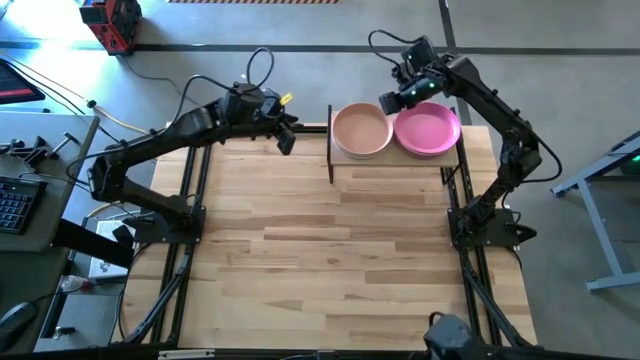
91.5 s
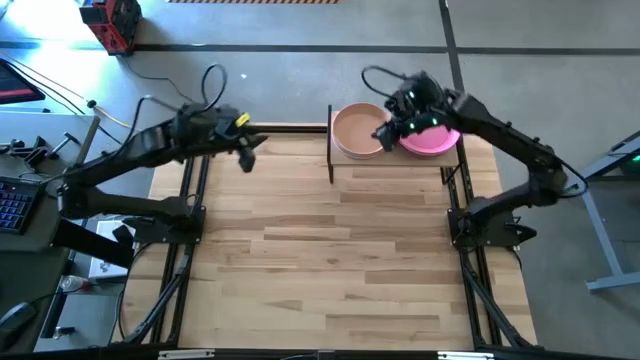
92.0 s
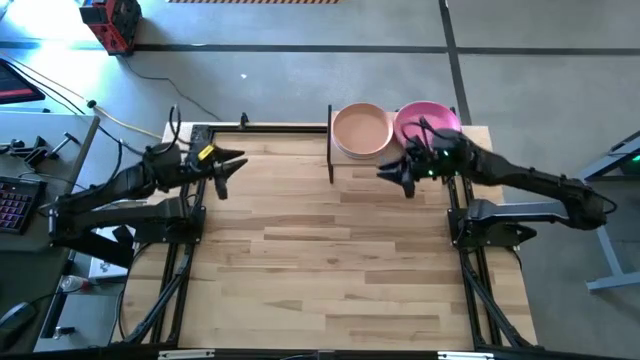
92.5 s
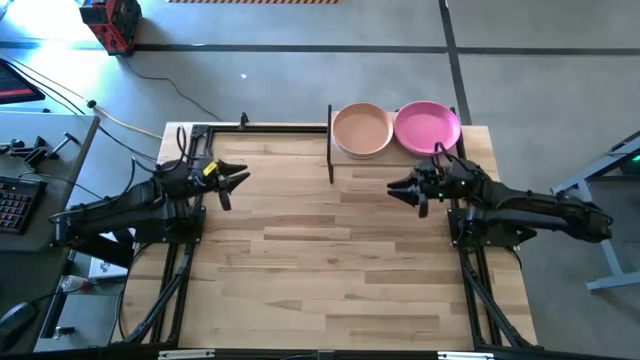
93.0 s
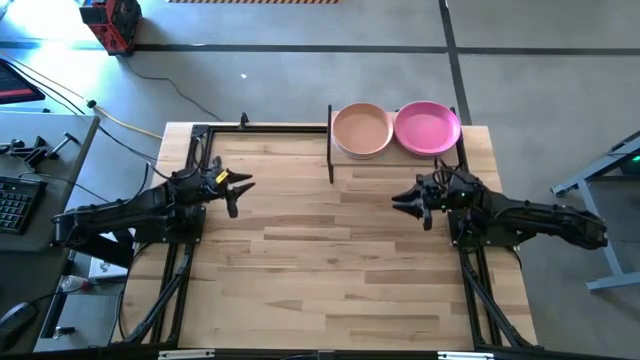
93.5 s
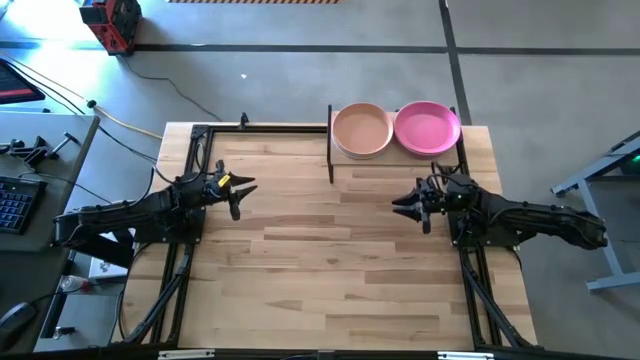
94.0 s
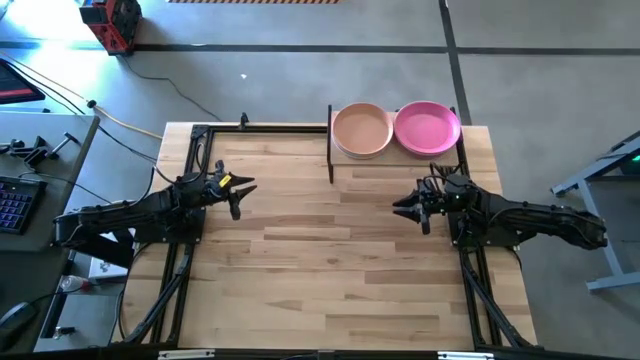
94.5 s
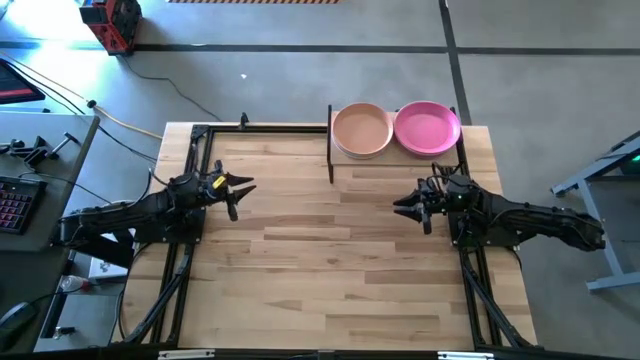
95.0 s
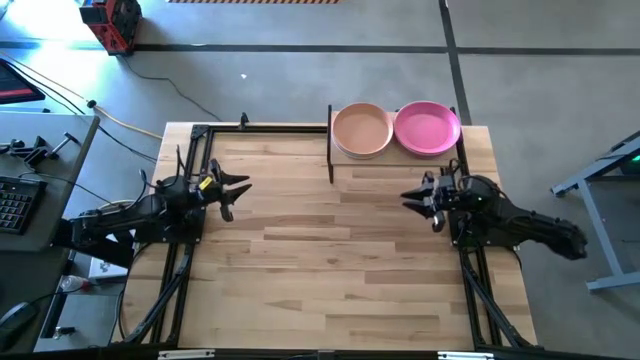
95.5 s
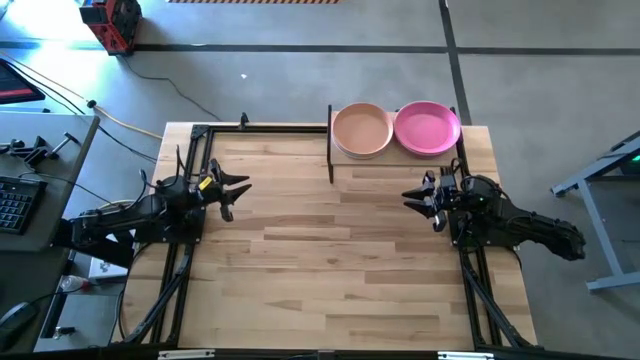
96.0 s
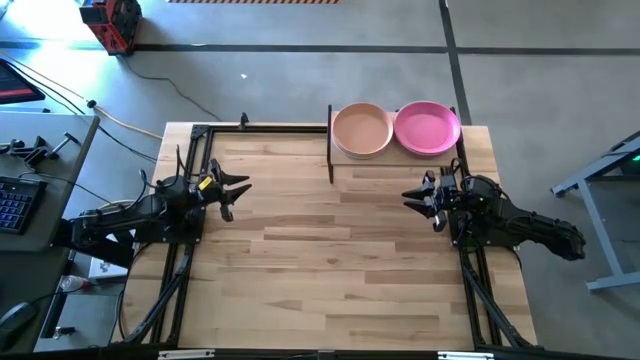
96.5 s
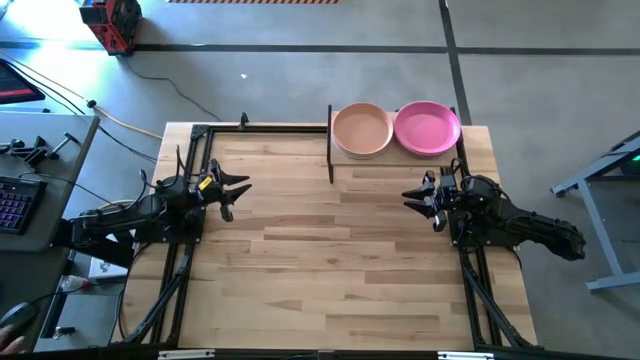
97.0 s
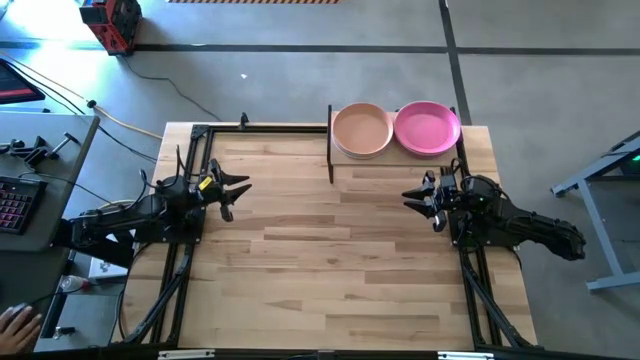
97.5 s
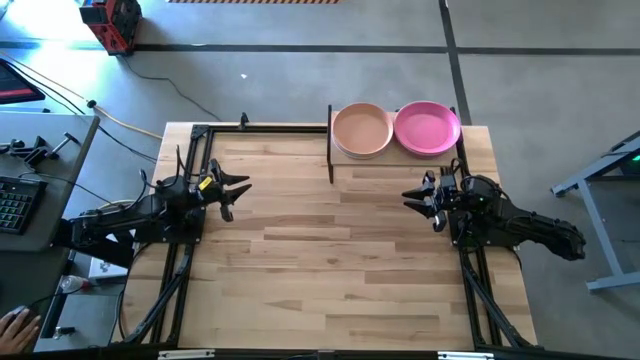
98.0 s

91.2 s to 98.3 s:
Task: Place and stack plates onto a shelf
Return to Home Position

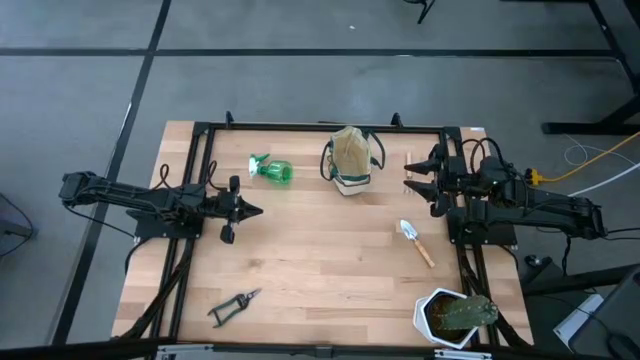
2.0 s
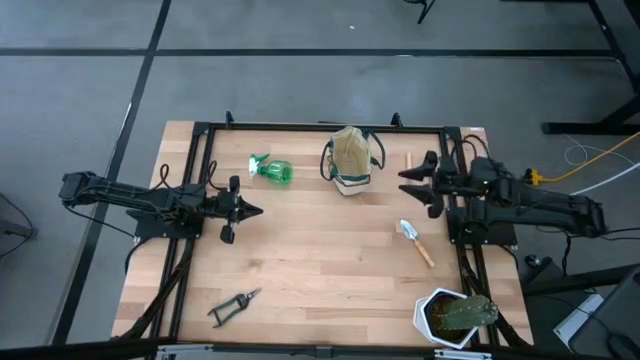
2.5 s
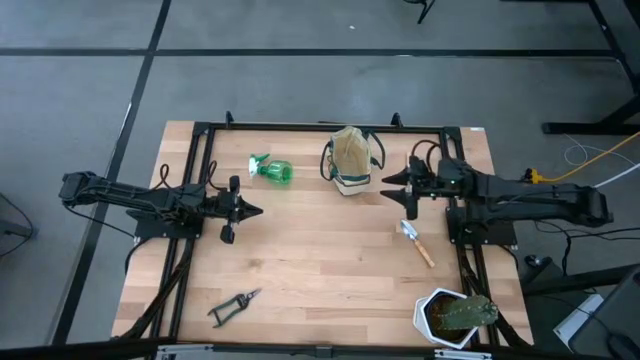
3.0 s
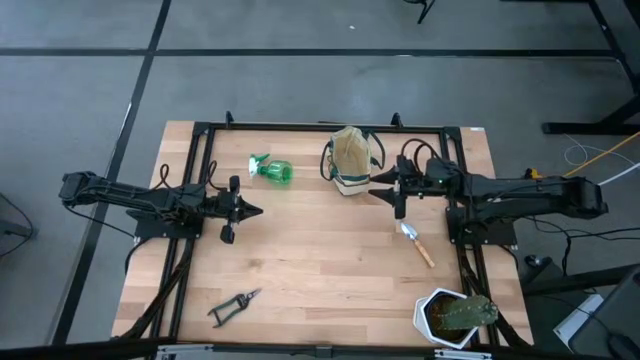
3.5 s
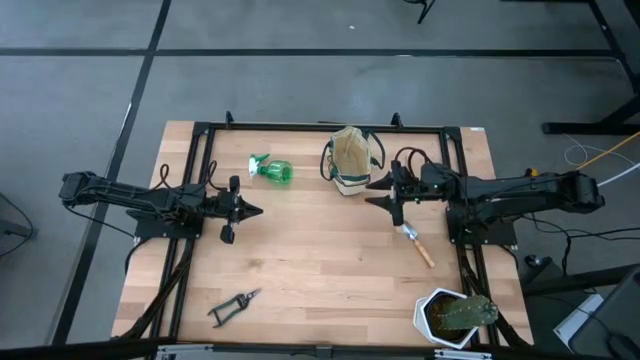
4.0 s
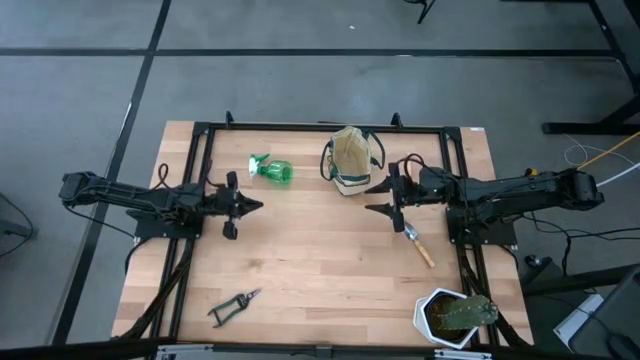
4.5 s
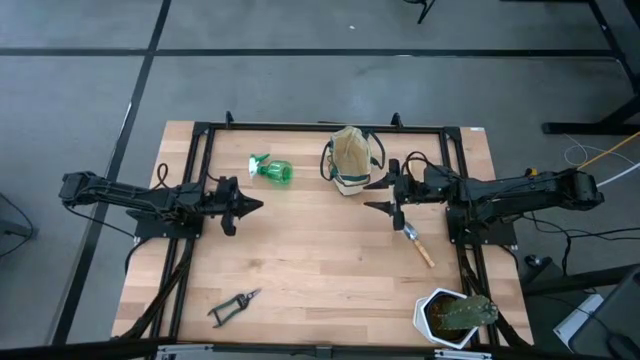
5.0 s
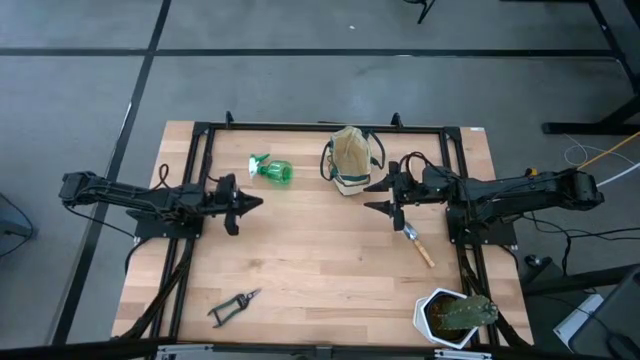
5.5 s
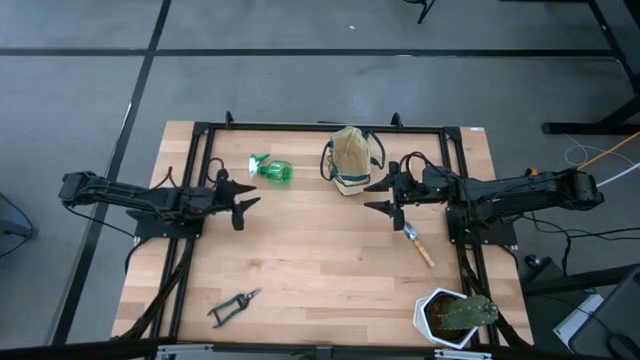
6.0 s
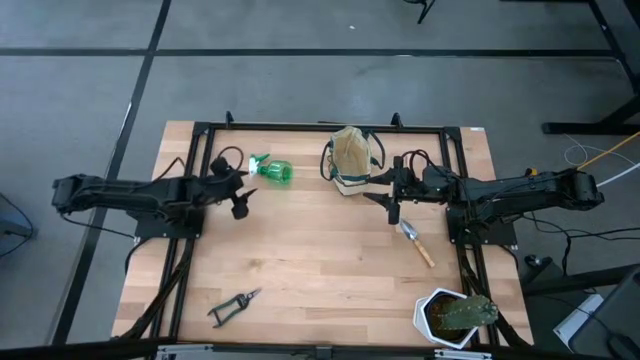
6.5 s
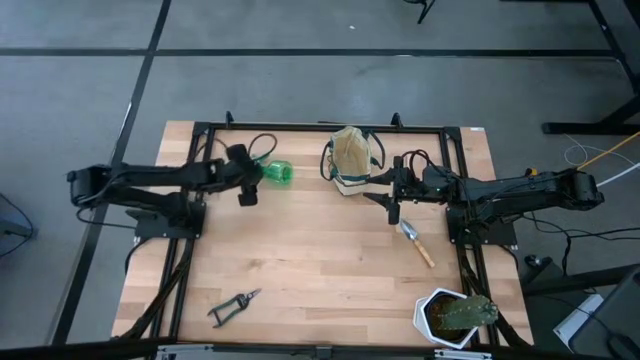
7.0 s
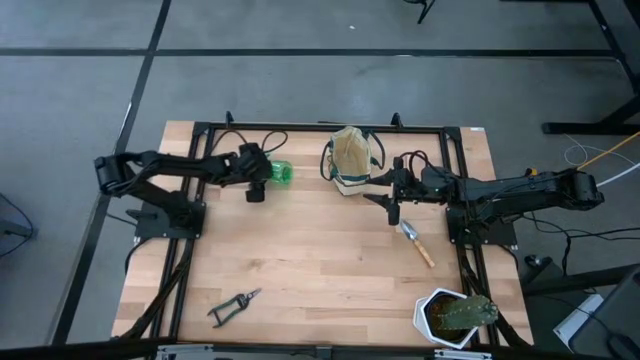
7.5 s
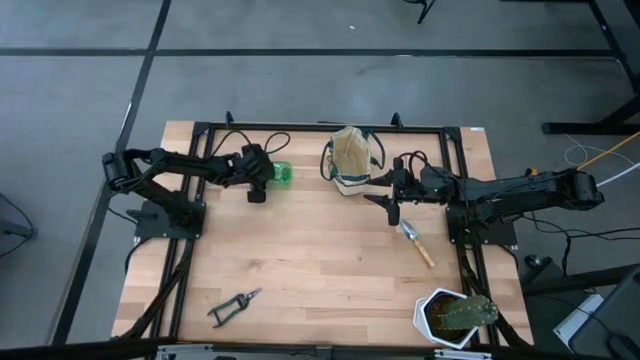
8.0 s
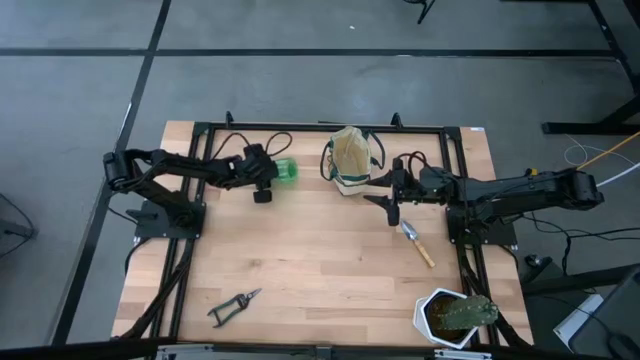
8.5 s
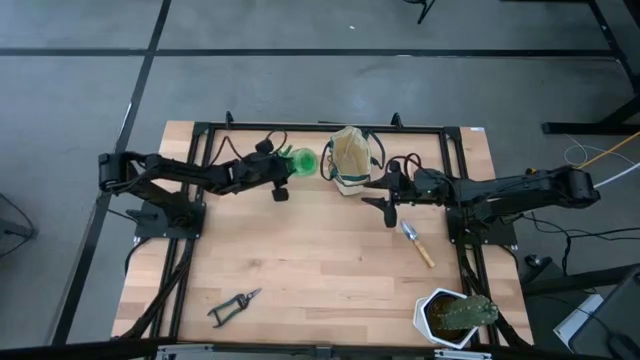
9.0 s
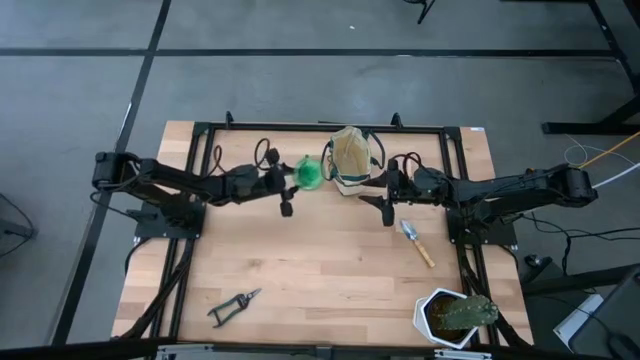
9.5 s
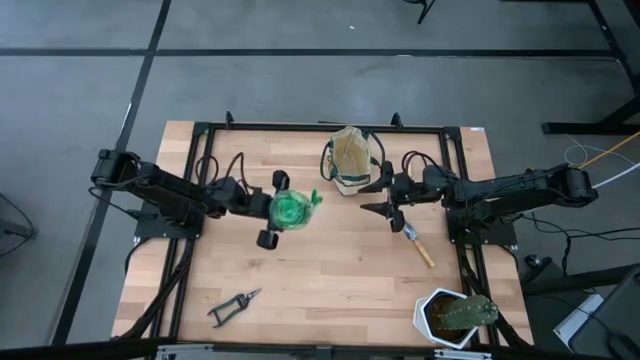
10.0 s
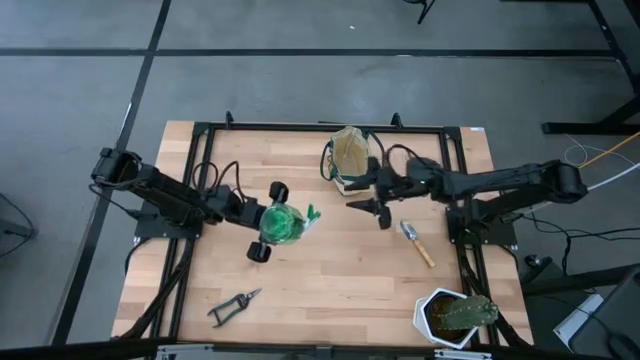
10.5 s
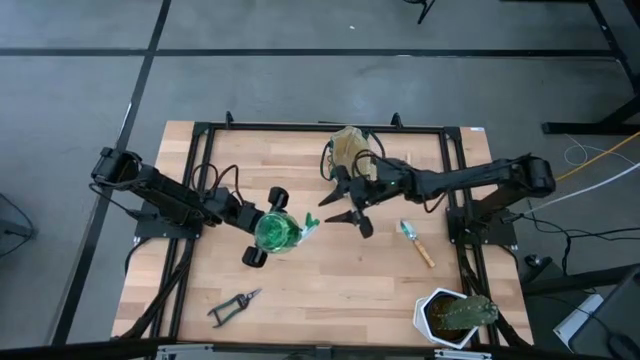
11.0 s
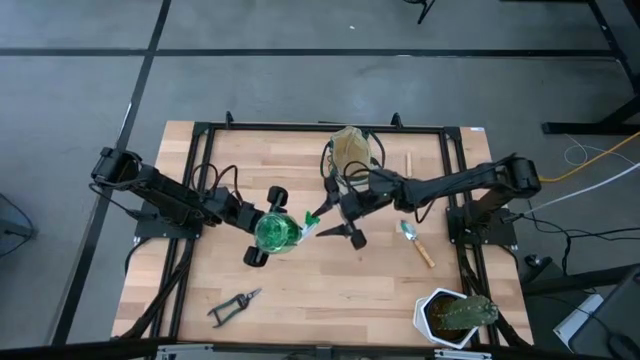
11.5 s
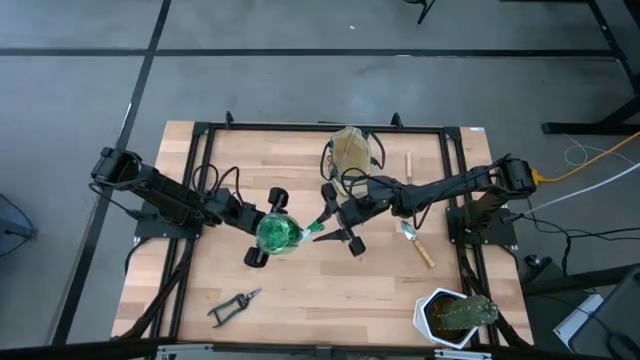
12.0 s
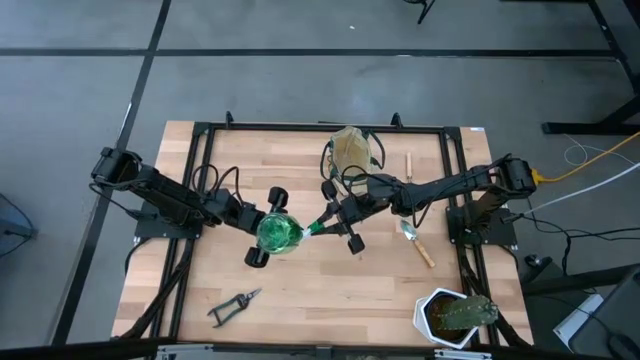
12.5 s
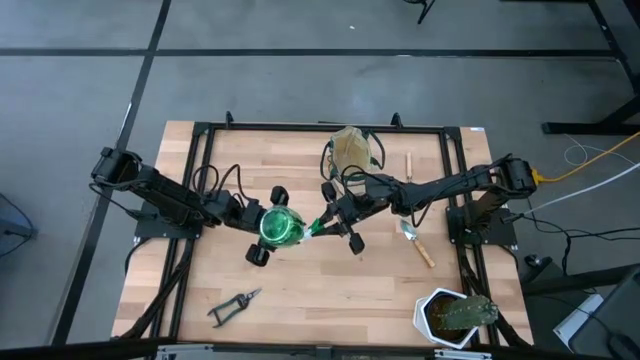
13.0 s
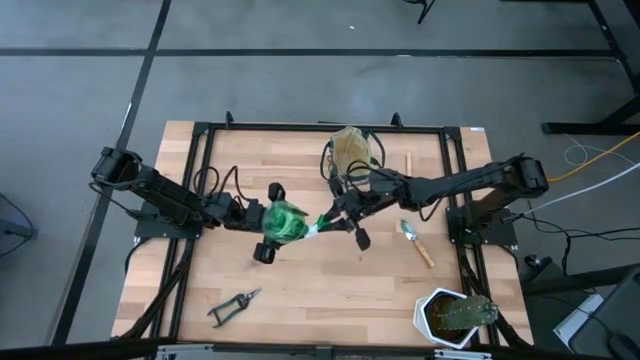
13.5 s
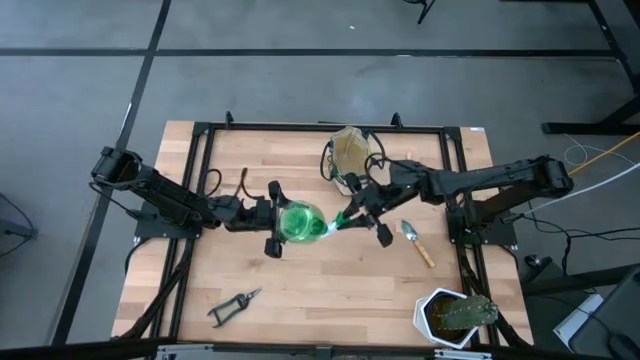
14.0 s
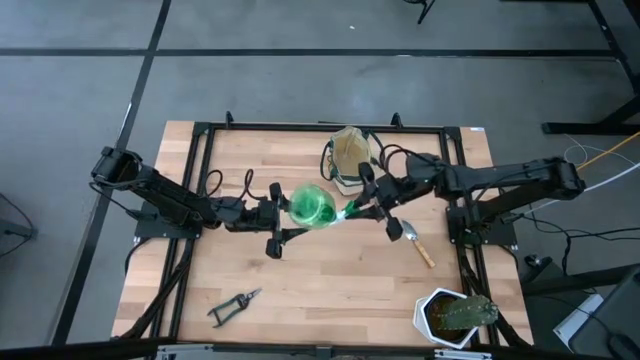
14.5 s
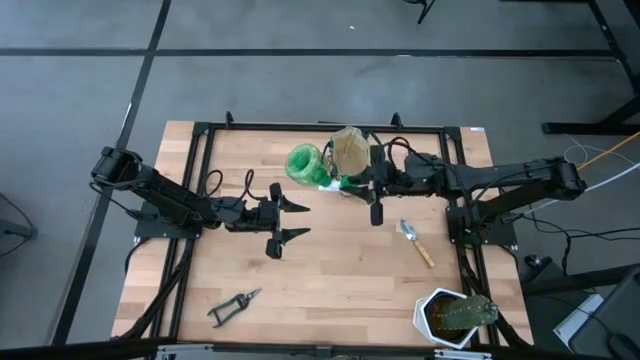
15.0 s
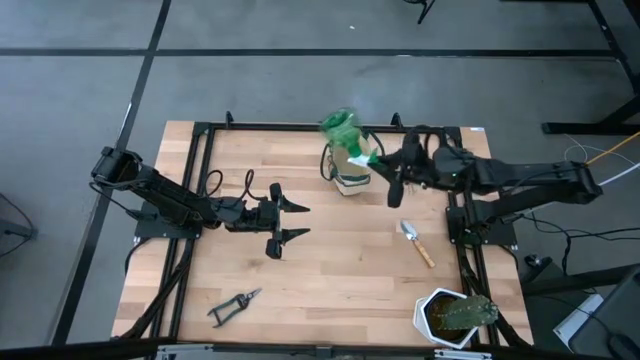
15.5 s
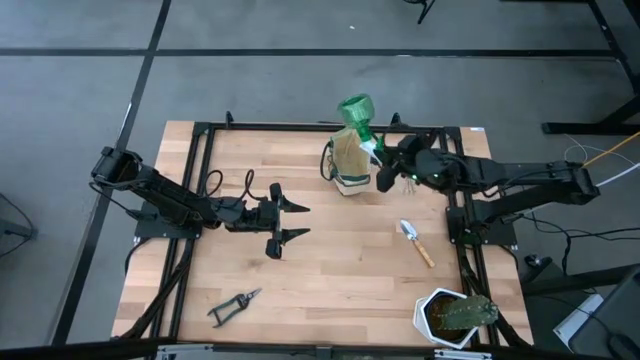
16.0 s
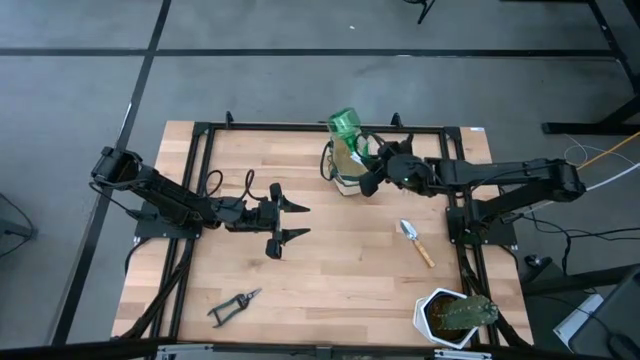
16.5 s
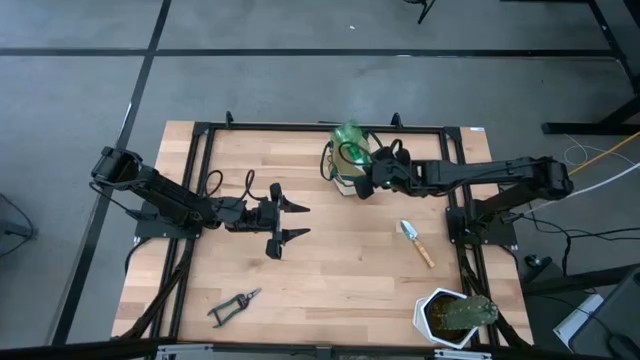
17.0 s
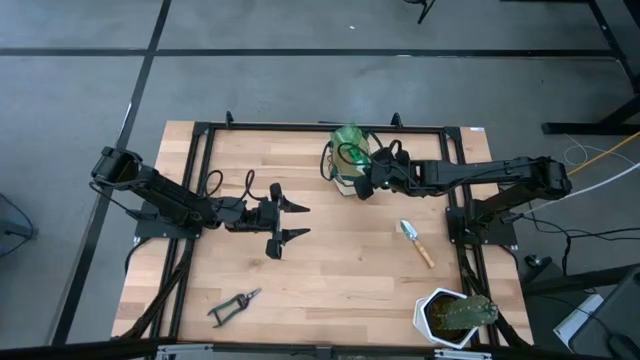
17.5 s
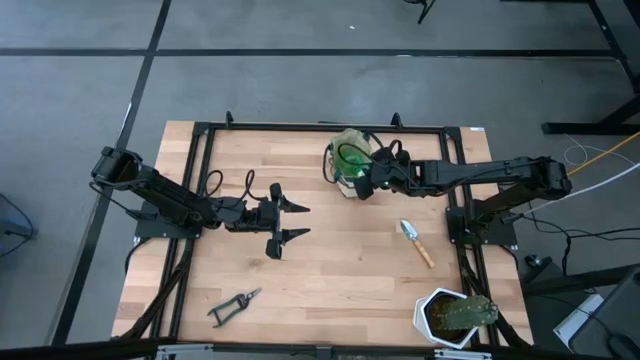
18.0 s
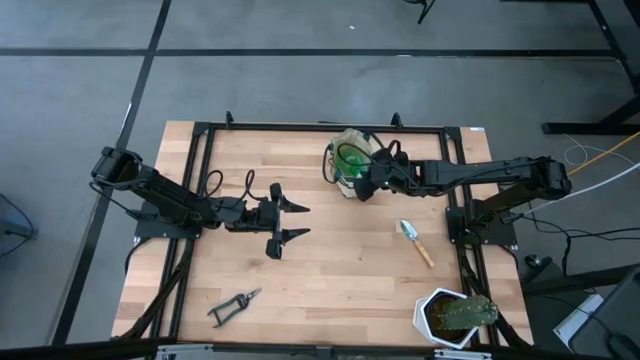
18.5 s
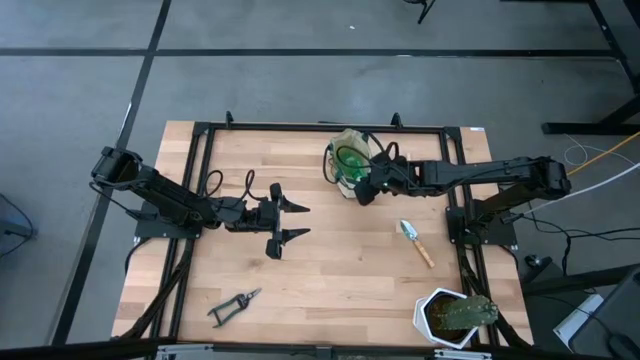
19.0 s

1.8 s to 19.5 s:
Task: Pick & Place Garden tools in Gardening bag
Put the spray bottle into the gardening bag
